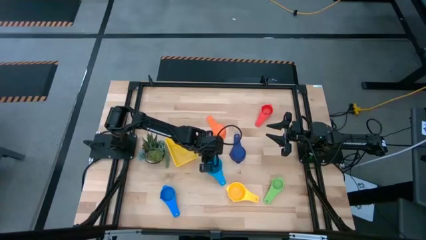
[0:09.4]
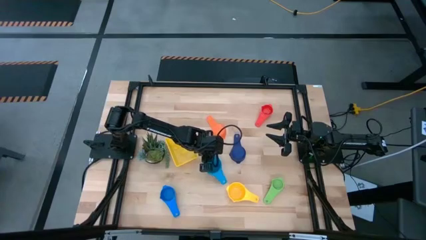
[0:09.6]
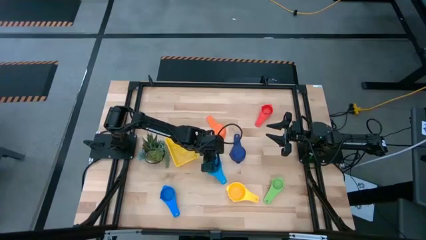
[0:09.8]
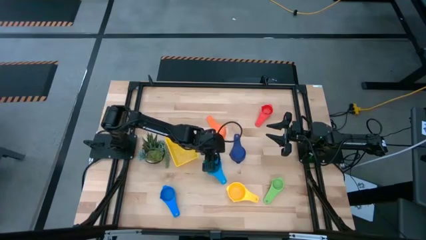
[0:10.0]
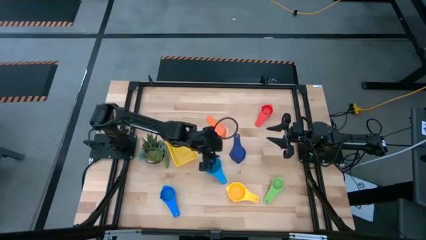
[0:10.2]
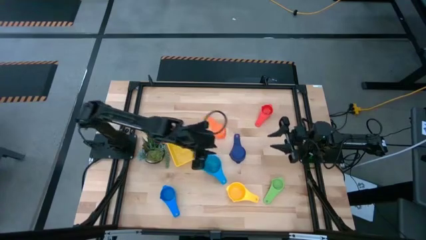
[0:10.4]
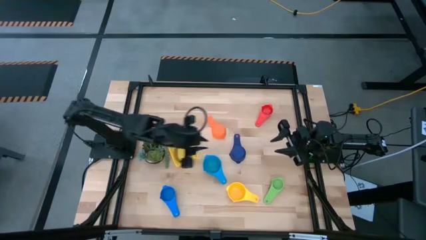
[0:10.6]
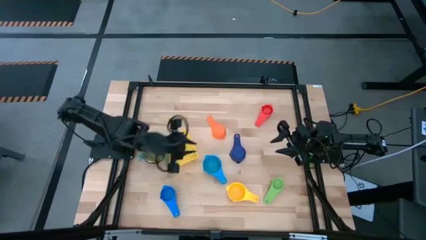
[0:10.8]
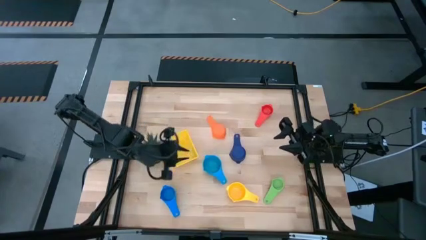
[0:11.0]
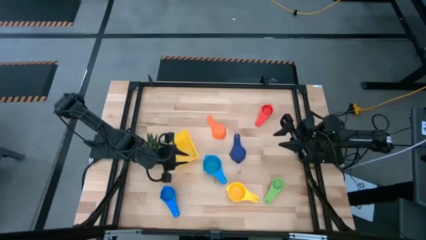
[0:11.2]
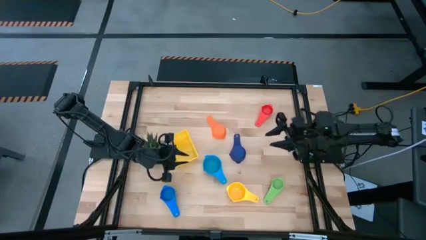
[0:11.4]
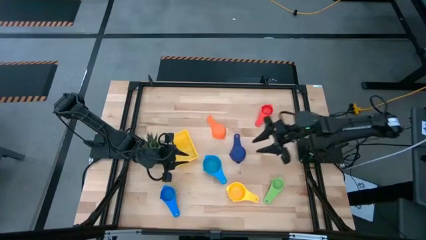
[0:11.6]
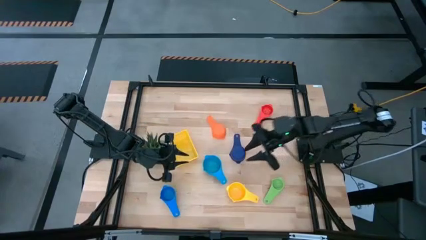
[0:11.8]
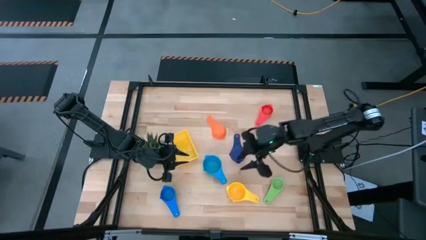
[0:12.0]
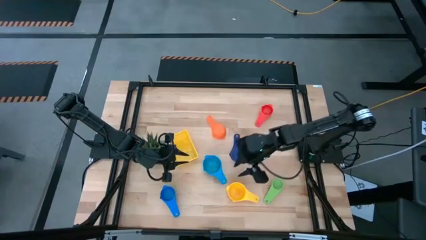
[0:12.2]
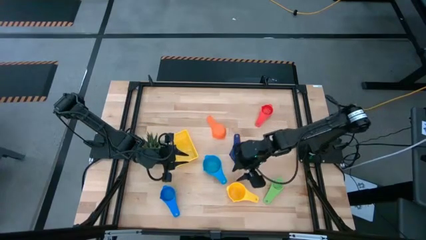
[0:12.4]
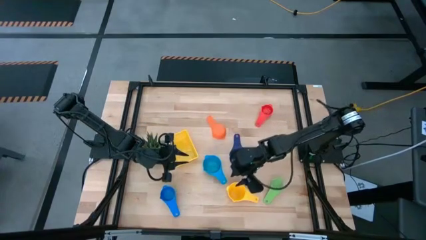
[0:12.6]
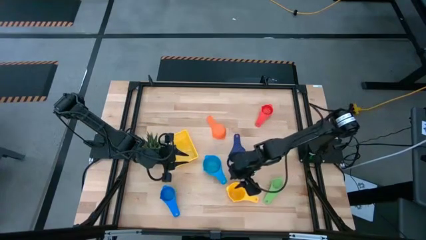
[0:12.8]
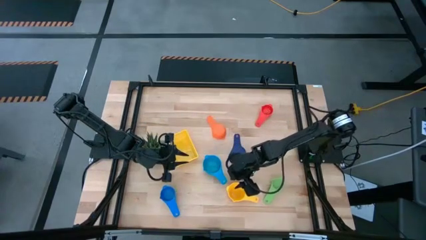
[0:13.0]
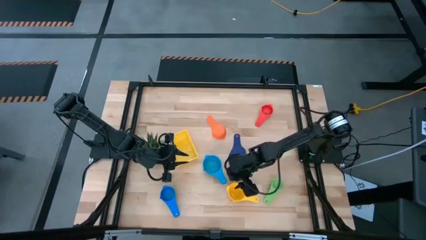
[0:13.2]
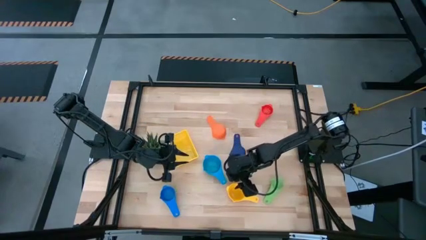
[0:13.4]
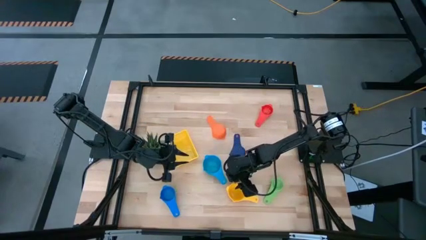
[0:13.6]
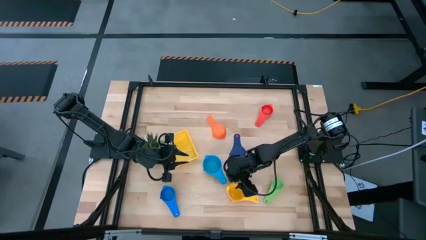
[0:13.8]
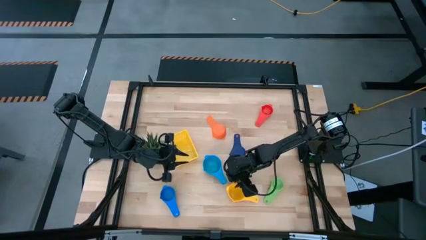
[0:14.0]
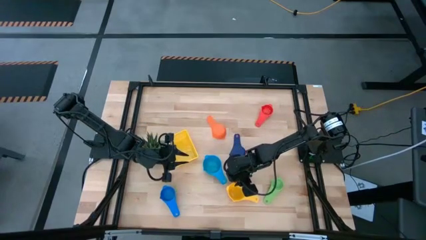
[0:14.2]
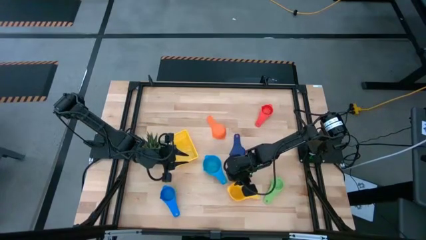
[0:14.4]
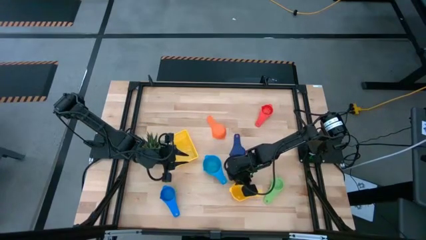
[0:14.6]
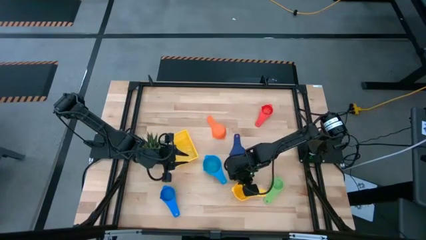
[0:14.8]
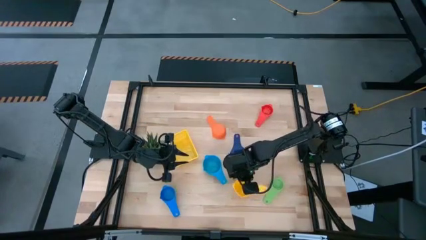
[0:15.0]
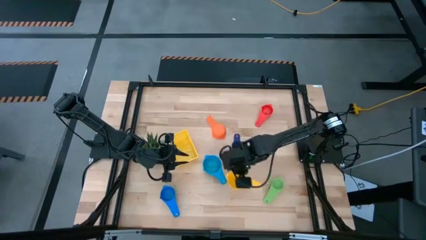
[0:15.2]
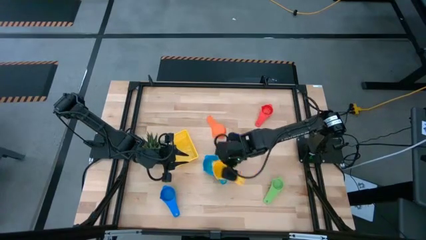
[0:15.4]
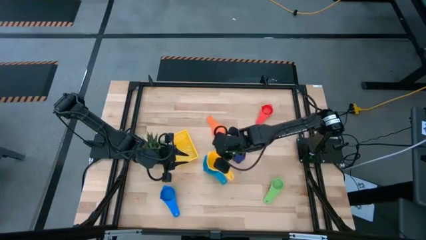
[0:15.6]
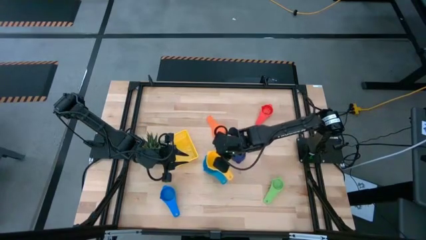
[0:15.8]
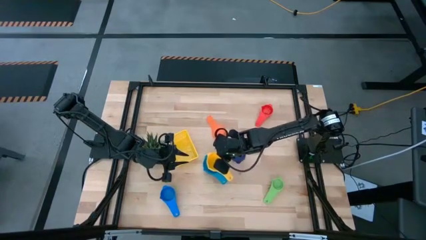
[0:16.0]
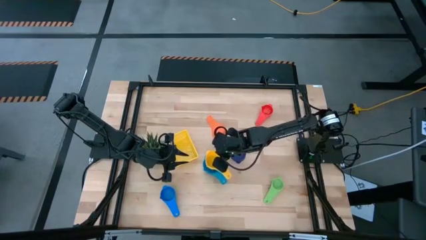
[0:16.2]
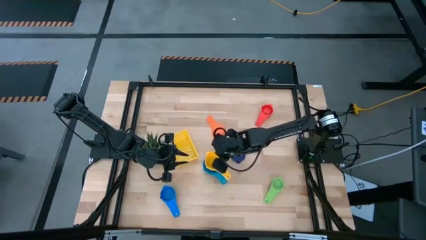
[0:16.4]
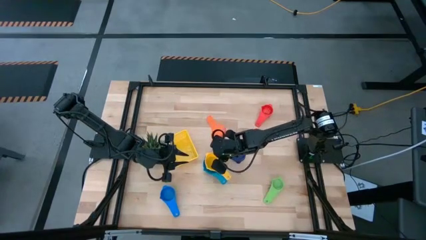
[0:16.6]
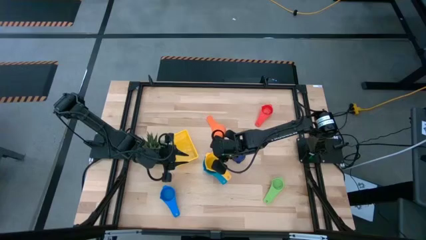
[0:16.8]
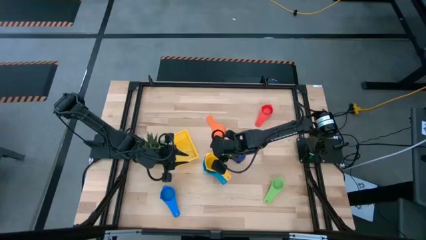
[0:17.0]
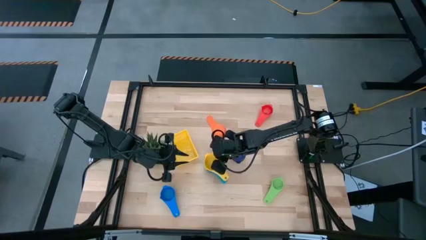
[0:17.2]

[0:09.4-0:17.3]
Task: Nest measuring cups in basket
Stack the yellow measuring cup on top of the light blue measuring cup

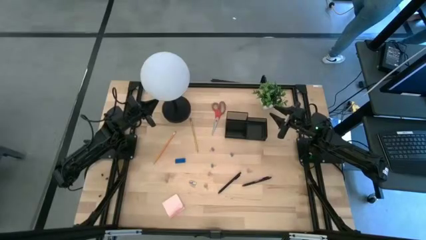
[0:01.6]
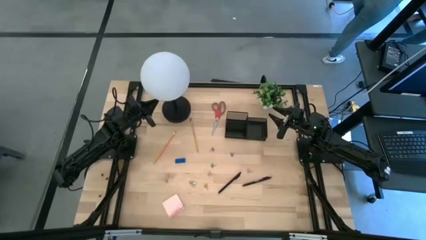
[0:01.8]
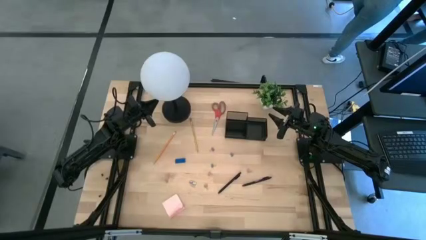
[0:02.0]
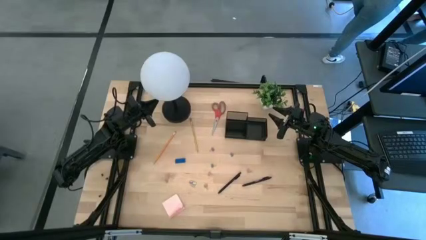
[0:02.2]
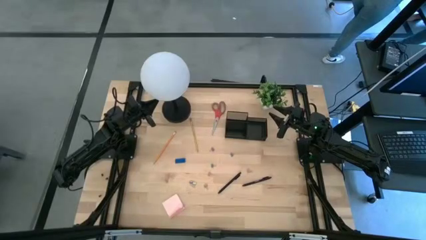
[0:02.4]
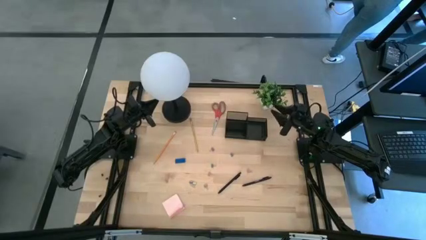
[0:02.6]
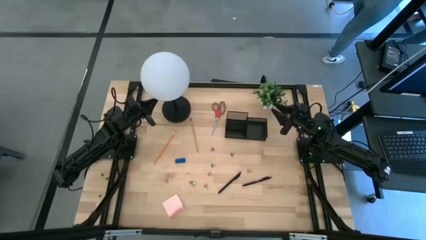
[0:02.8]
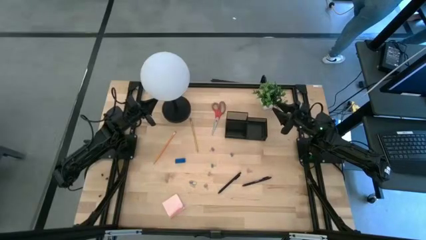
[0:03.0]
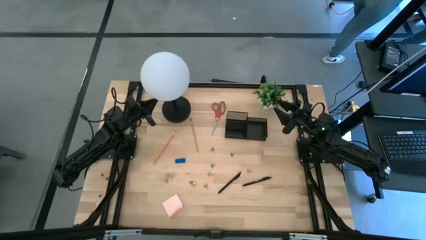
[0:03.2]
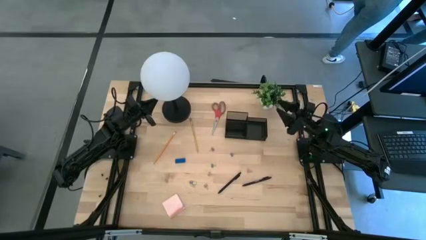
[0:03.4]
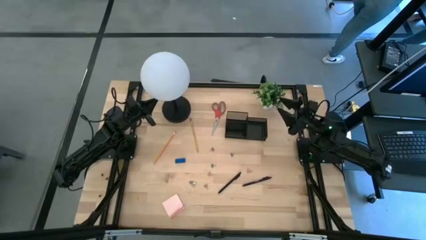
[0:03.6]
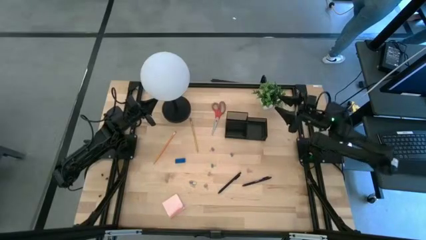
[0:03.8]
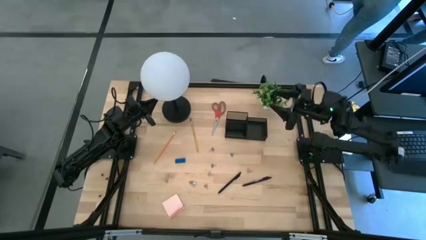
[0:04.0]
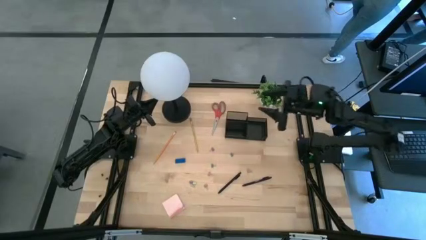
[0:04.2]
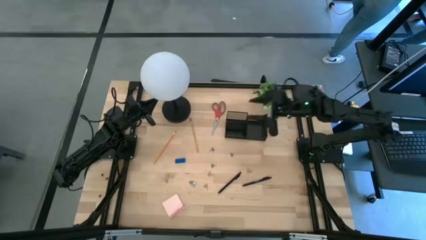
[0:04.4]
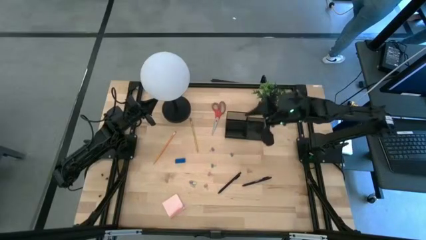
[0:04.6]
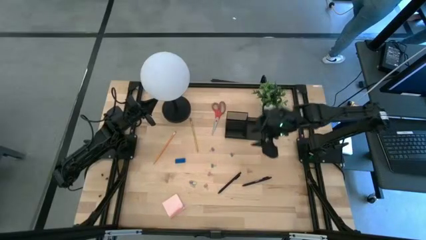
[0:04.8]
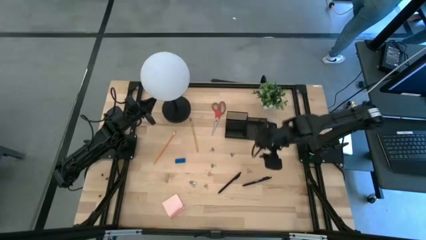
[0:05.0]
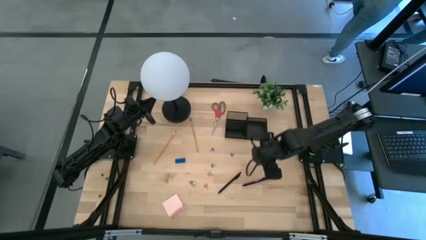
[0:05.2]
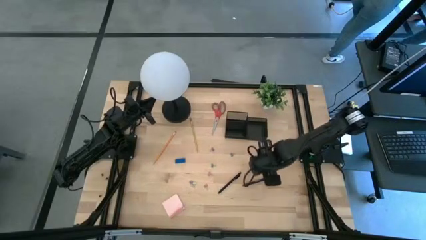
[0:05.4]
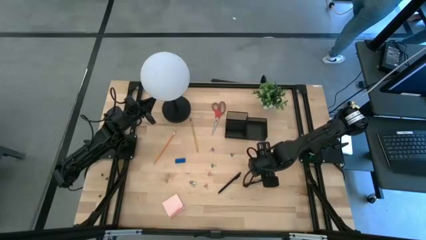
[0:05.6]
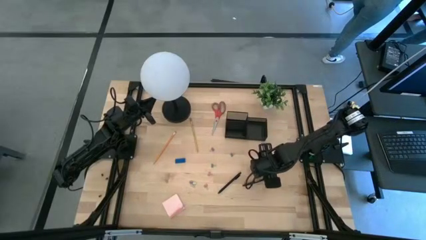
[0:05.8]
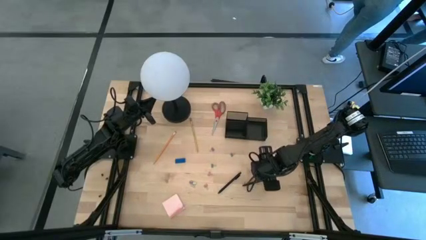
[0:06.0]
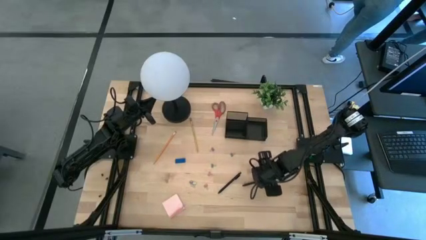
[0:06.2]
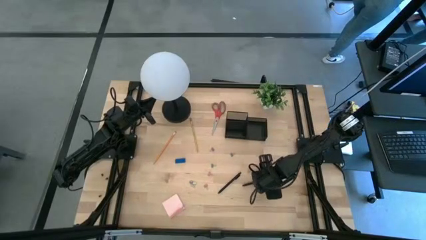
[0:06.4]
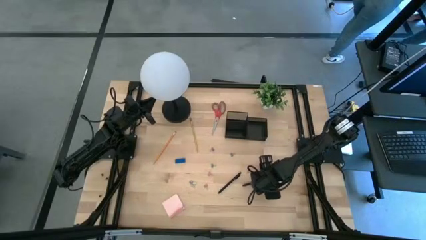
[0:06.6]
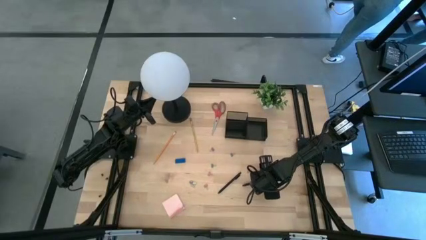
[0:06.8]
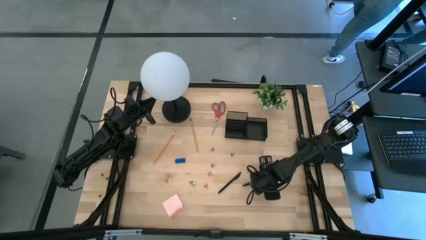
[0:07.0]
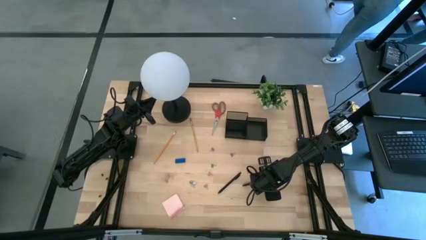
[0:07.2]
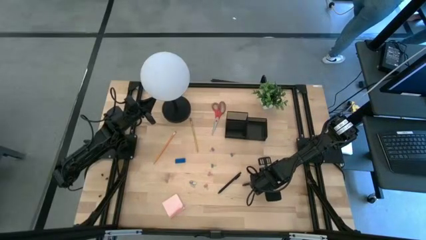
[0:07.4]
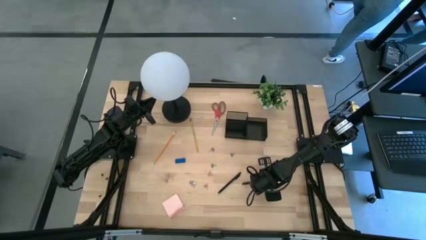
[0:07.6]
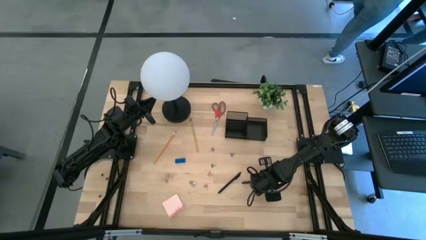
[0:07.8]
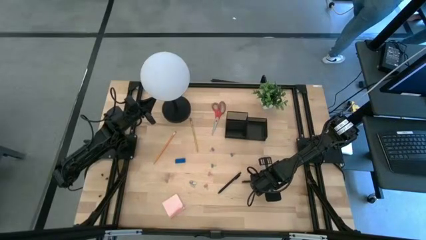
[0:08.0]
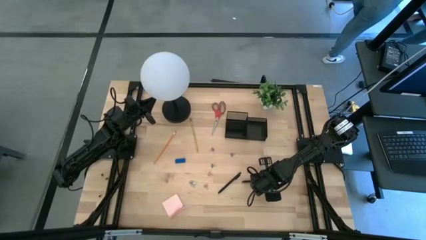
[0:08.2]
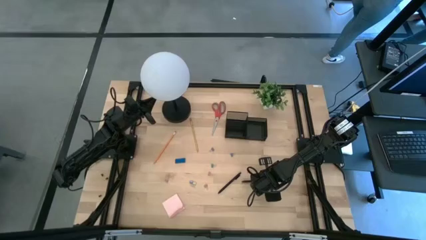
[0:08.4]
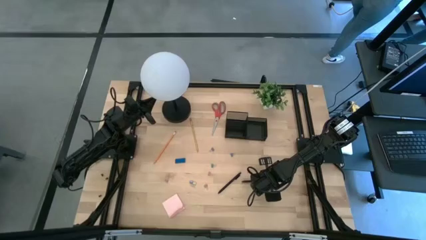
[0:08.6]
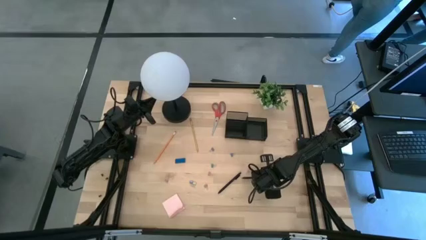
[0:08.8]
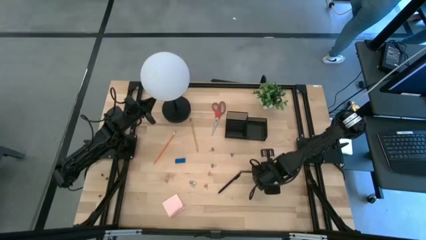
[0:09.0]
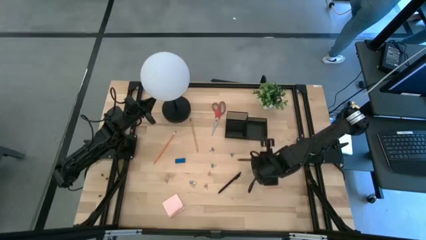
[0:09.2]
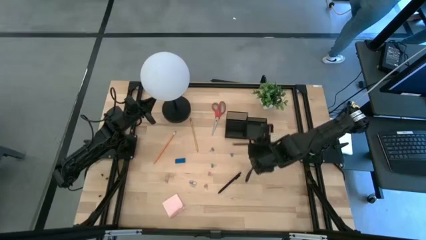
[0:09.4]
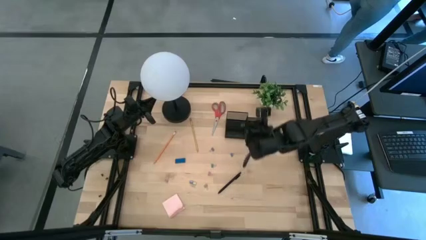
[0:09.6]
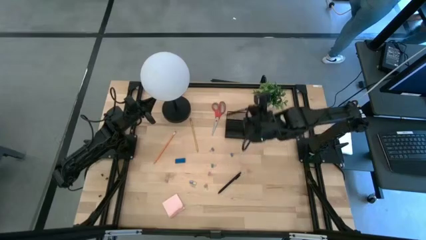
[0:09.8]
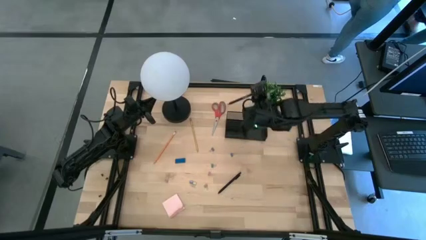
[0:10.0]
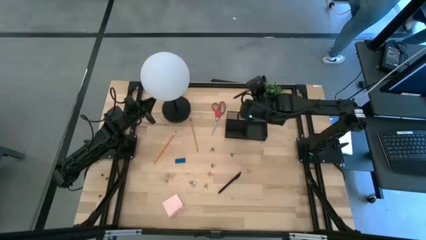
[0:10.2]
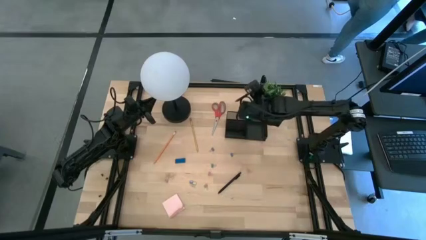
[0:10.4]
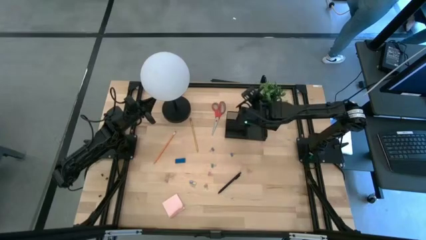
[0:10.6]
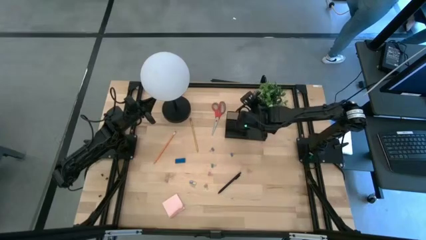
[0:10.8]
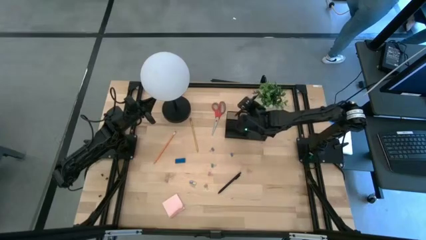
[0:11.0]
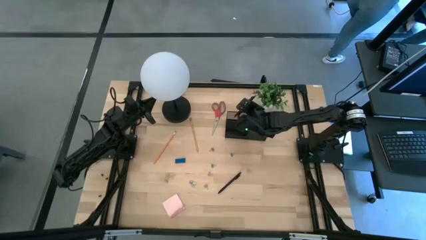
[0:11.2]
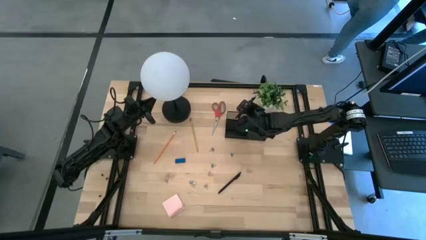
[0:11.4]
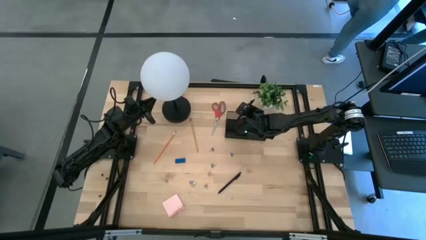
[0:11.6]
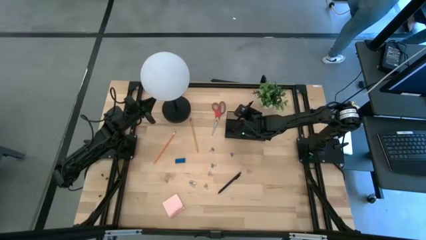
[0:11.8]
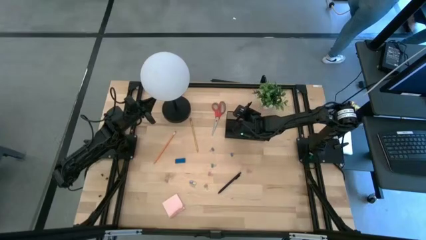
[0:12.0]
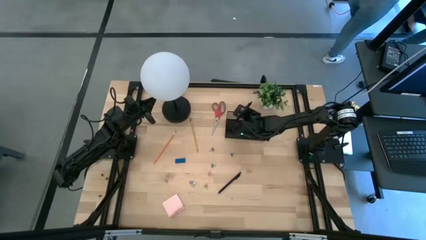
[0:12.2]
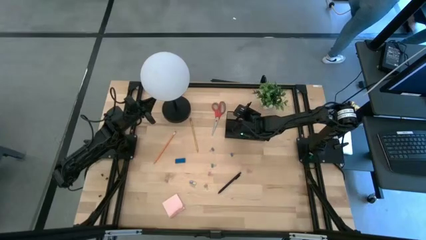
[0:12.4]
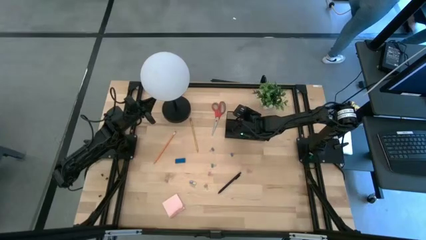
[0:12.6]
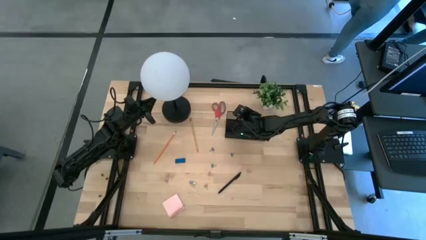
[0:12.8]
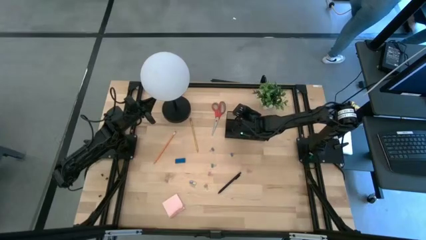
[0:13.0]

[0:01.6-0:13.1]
Task: Pick and place office supplies into organizer
Put the left black pen into the black desk organizer
